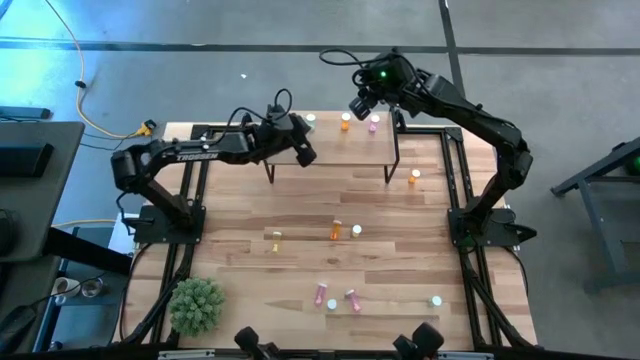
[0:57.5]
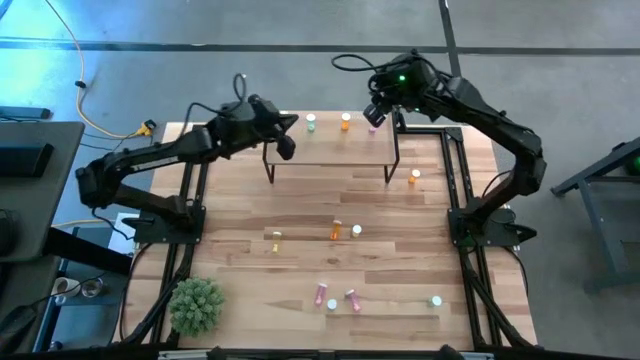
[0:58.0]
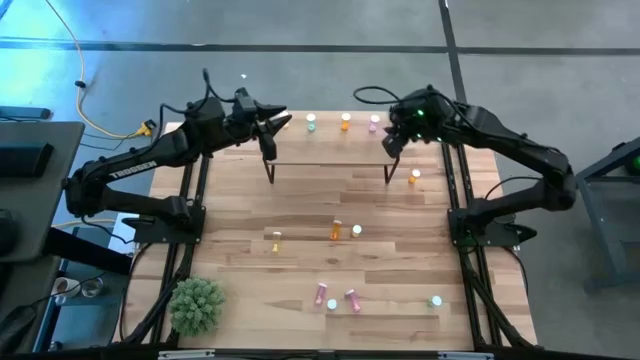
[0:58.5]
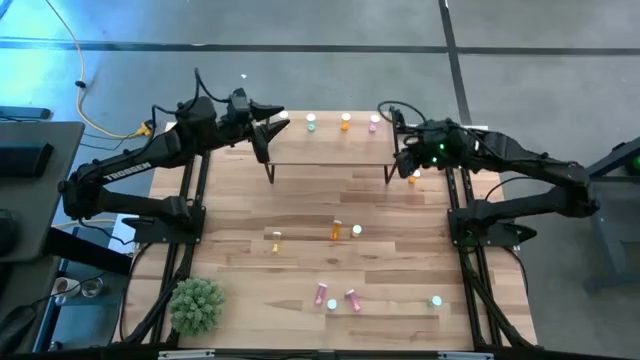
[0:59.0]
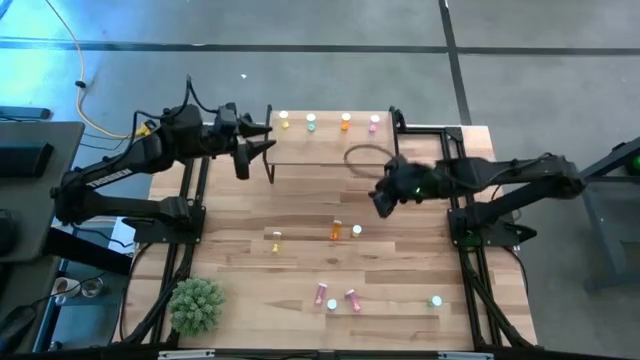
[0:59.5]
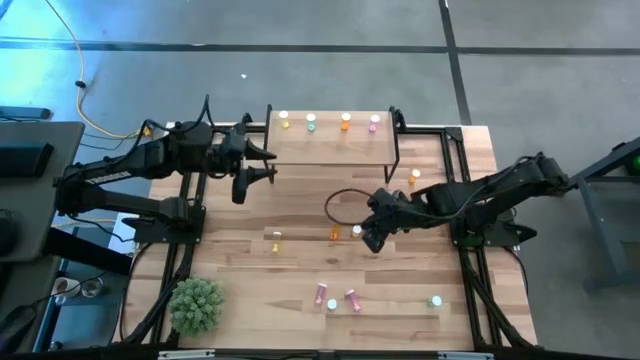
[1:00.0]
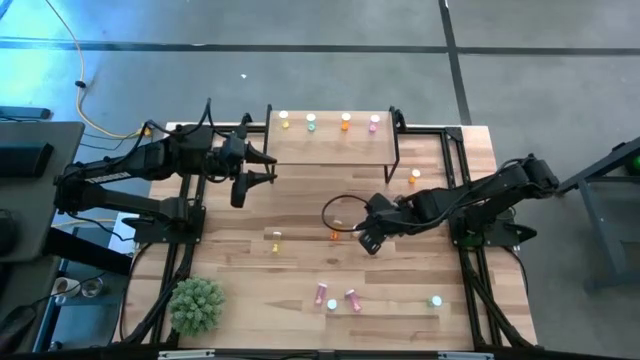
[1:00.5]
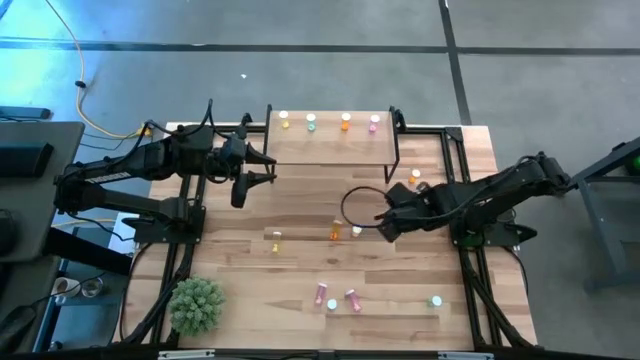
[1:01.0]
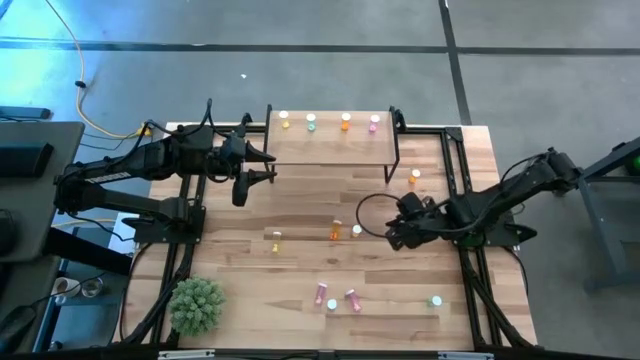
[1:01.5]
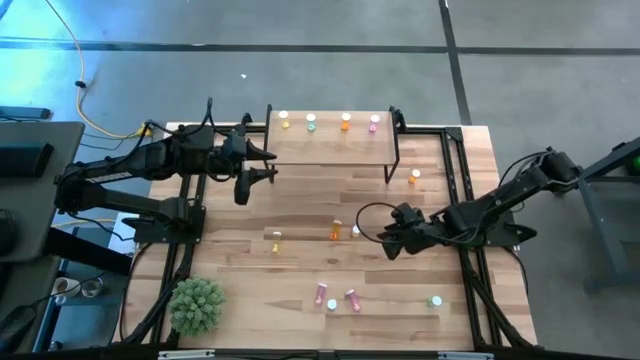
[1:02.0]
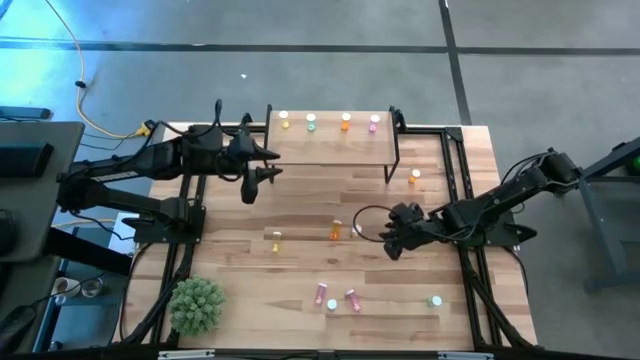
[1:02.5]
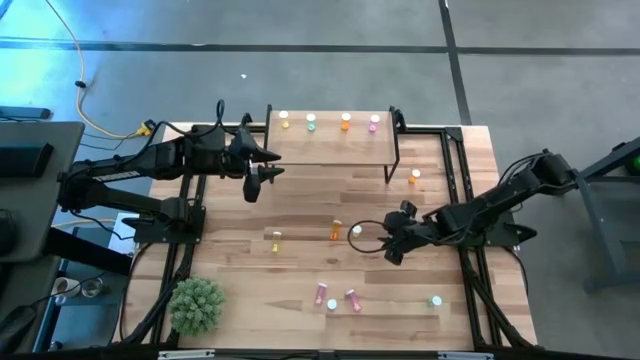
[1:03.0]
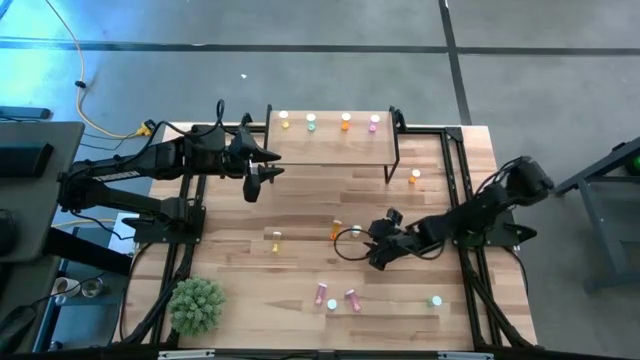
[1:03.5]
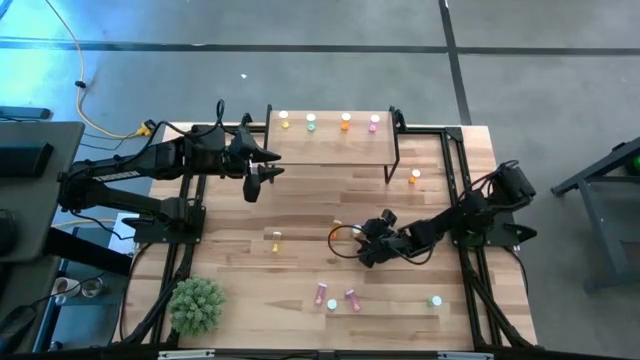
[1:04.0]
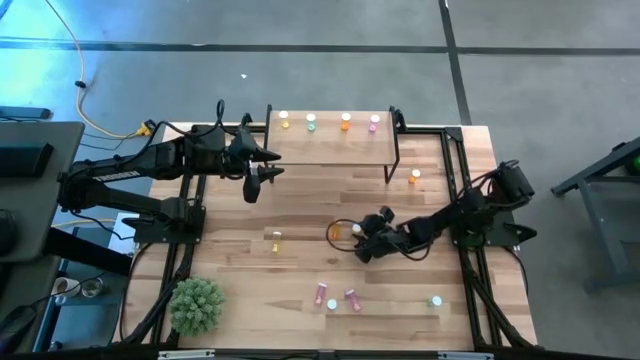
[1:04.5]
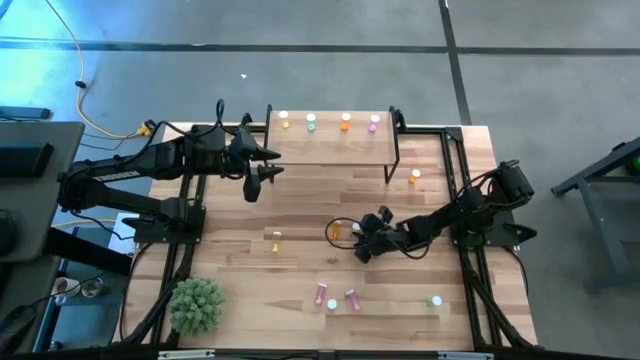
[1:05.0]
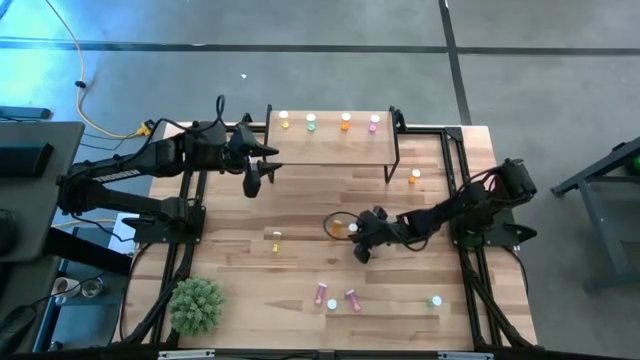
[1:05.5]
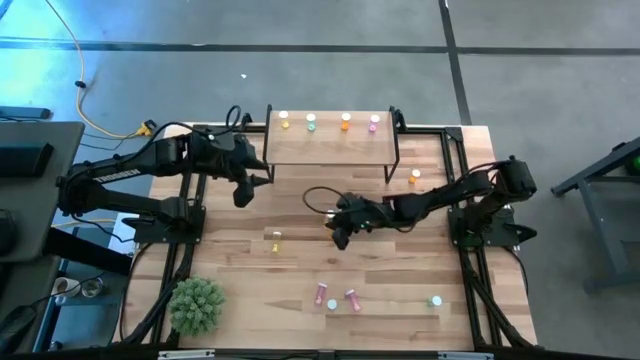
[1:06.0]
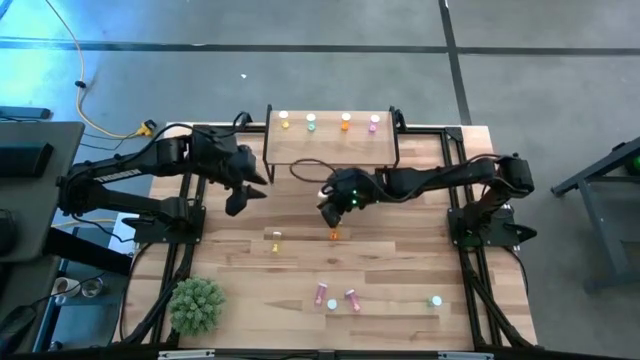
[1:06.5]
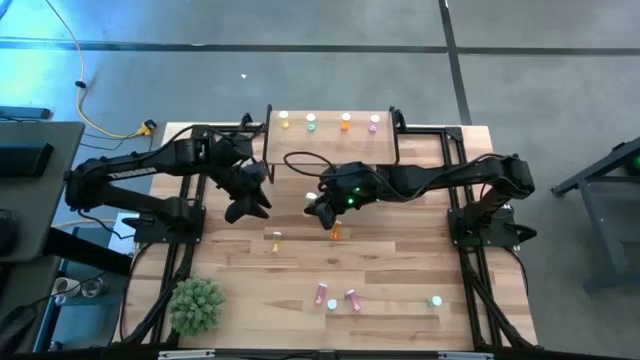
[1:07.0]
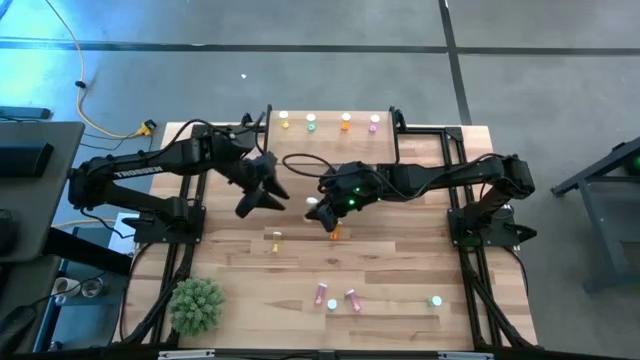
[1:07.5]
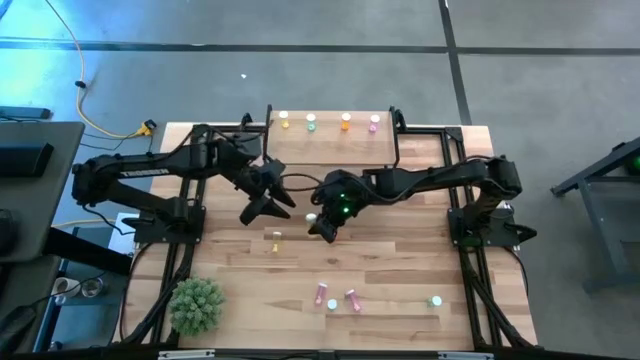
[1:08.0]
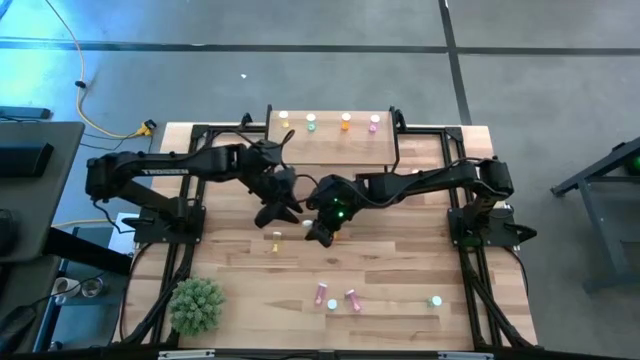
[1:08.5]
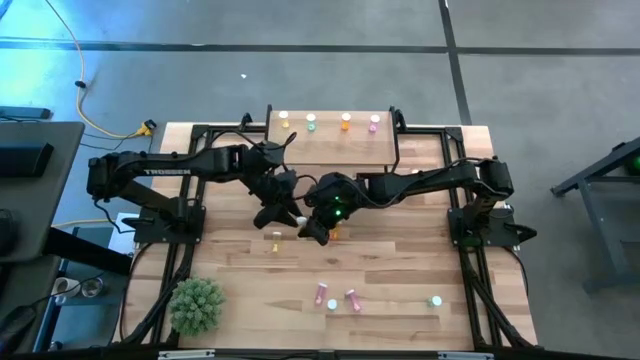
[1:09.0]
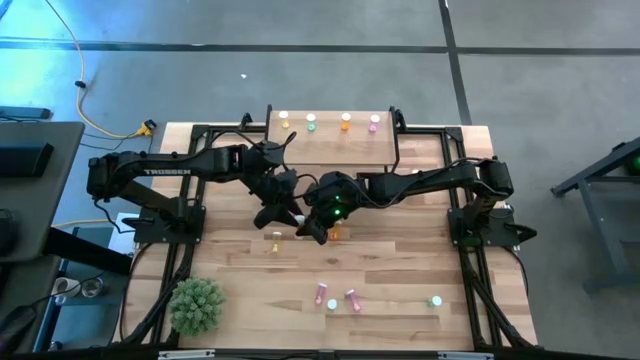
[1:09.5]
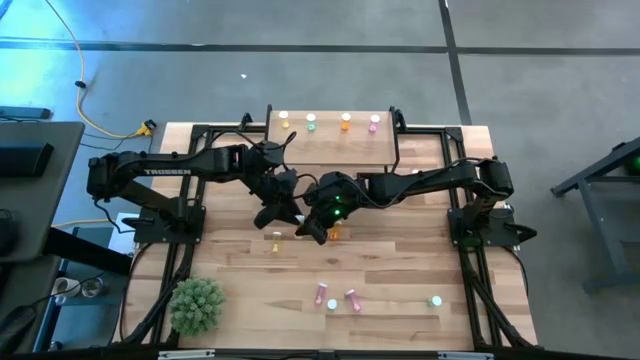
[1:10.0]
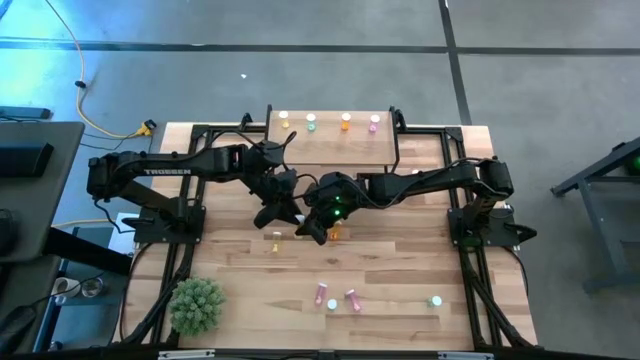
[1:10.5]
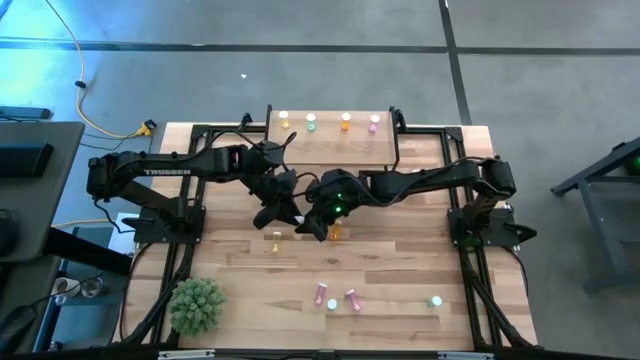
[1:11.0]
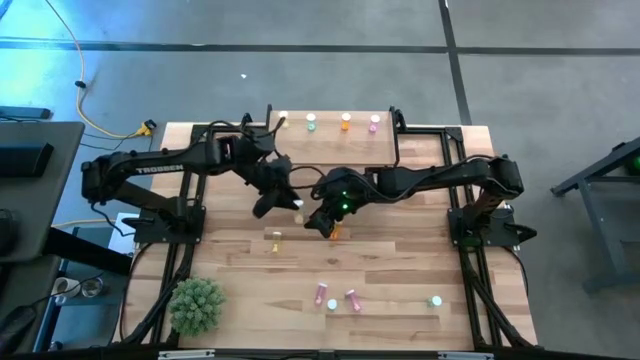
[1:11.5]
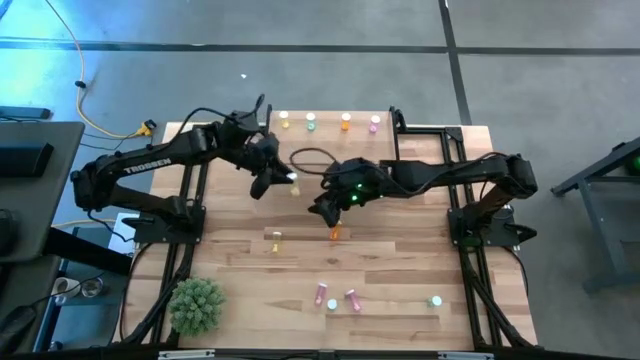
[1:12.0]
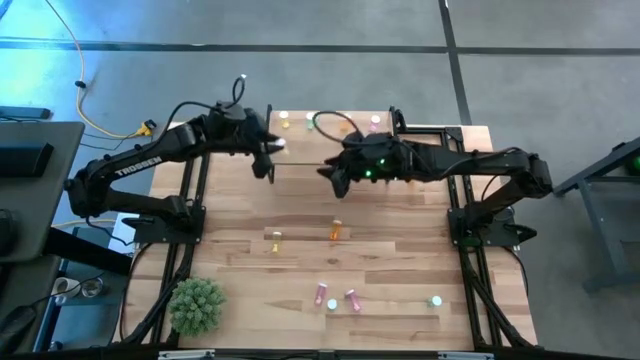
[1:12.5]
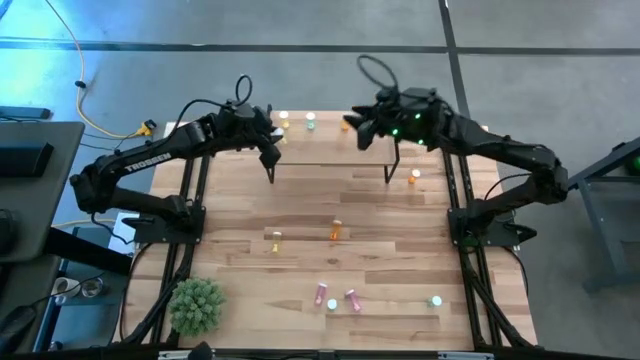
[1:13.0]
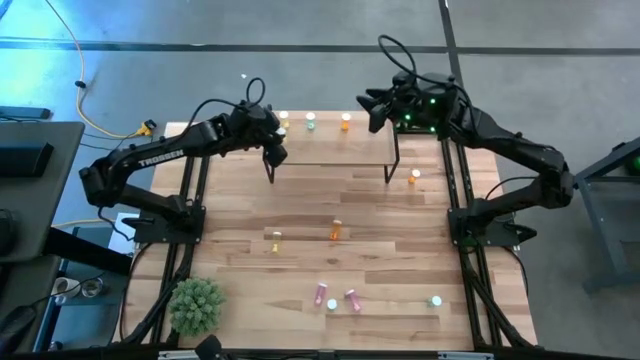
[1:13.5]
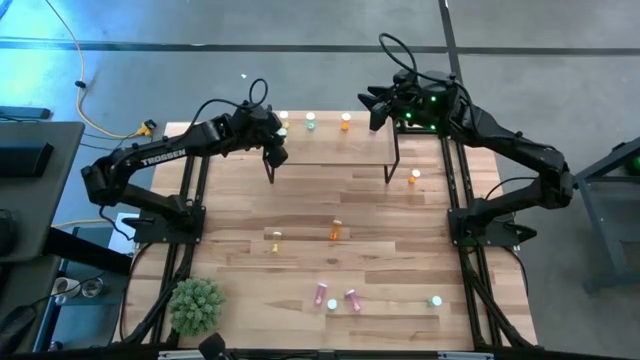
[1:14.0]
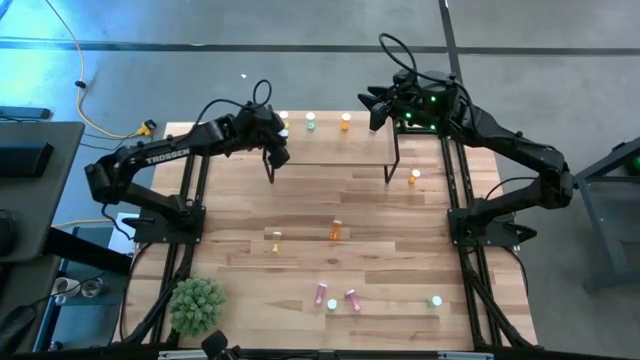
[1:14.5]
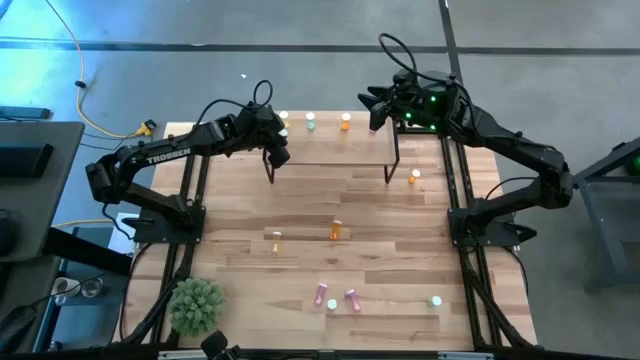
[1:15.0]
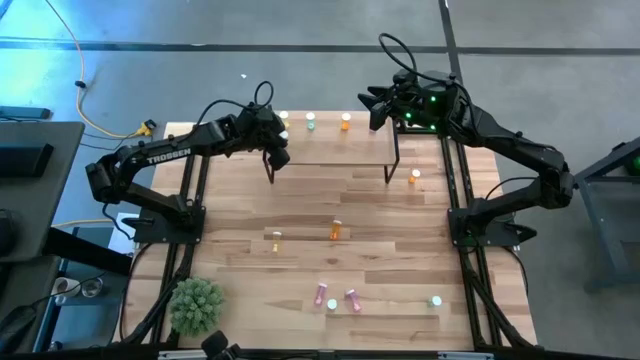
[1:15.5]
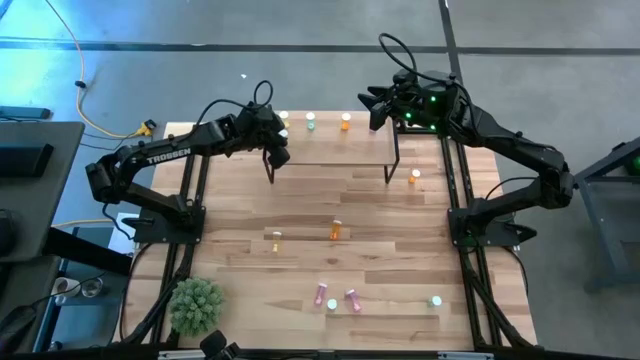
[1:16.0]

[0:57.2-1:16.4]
Task: Pick and place medicine bottles onto shelf by color
Put the right yellow pill bottle on the shelf aligned with the other yellow pill bottle

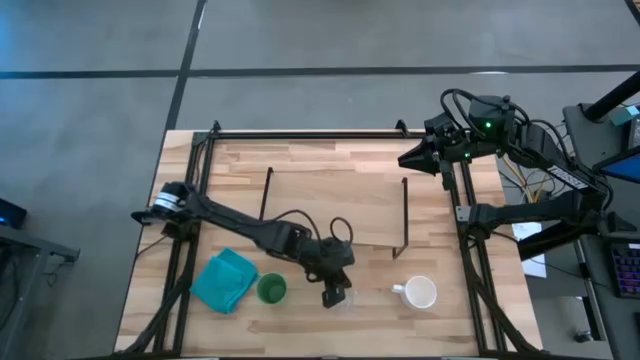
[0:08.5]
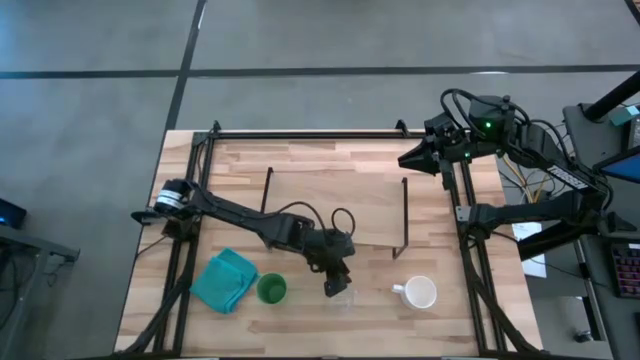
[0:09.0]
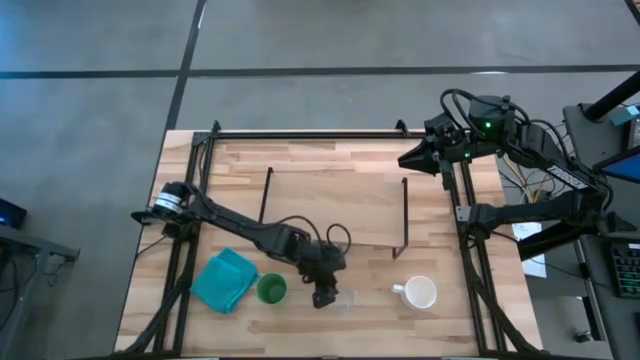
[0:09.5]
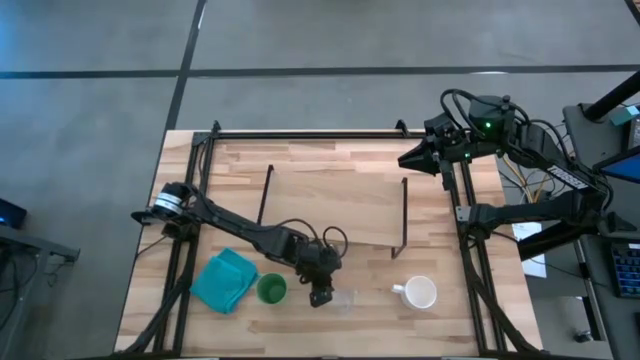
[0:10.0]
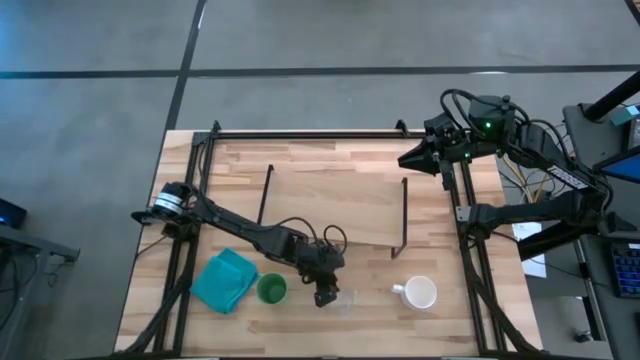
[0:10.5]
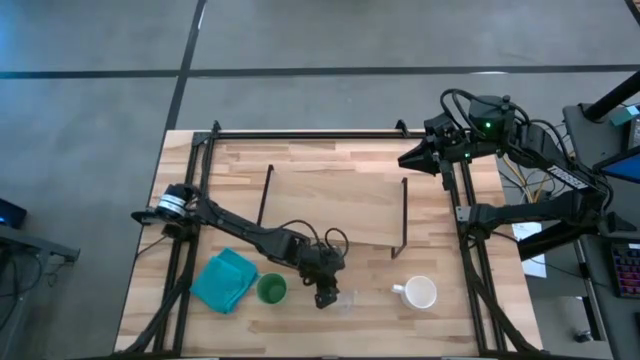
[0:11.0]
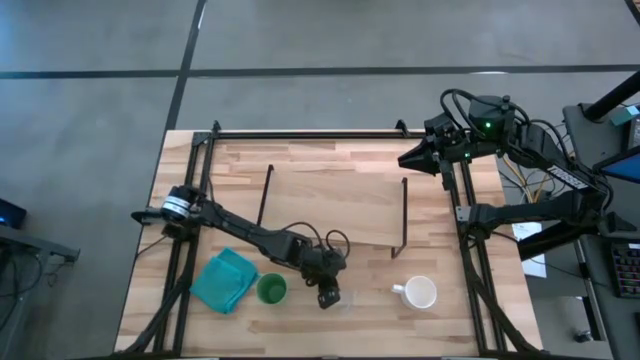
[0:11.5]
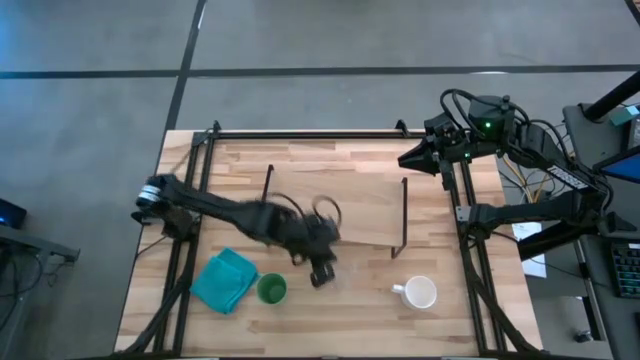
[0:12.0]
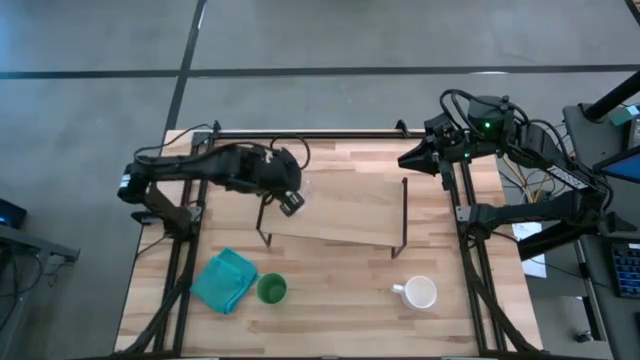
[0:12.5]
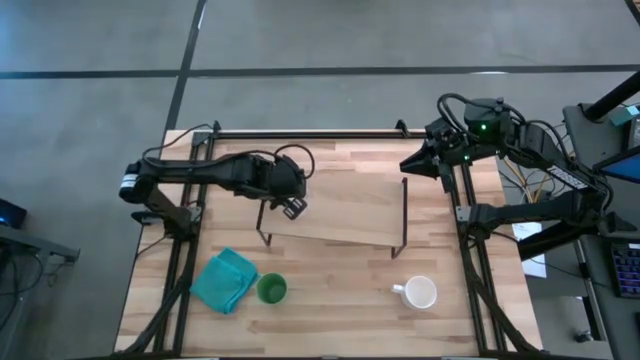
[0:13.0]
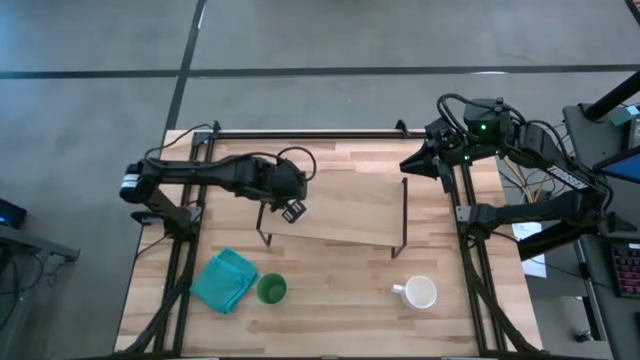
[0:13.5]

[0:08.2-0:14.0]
Task: Stack small to large cups/mugs on shelf
Put the transparent cup on the shelf
